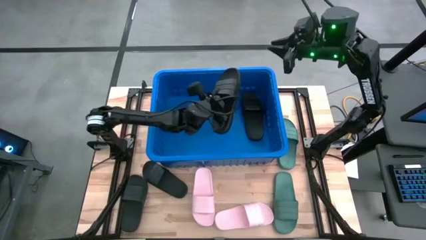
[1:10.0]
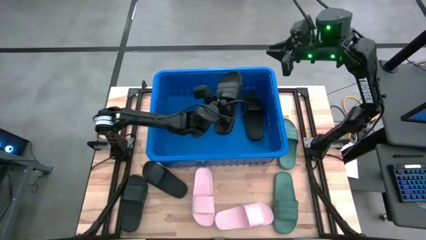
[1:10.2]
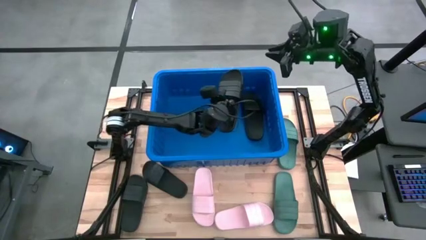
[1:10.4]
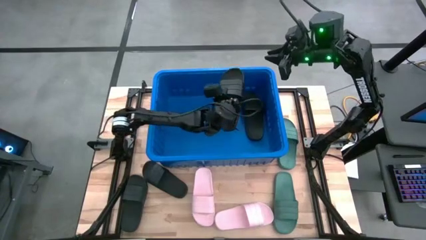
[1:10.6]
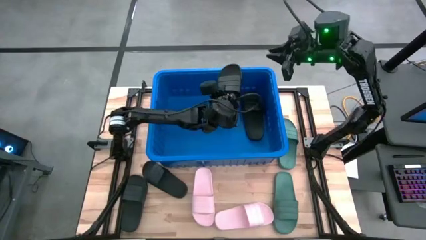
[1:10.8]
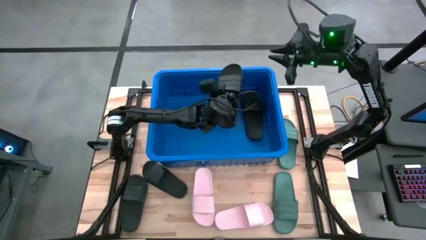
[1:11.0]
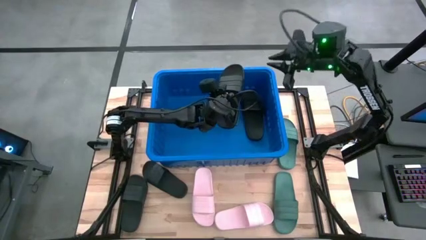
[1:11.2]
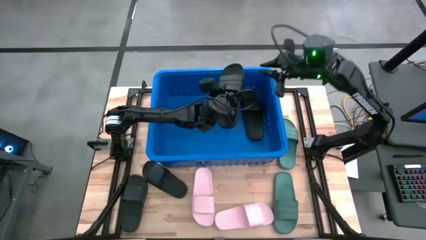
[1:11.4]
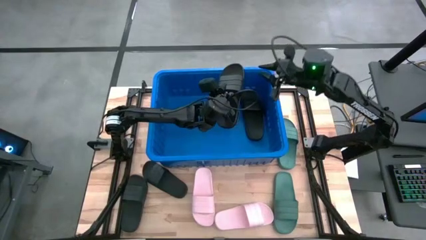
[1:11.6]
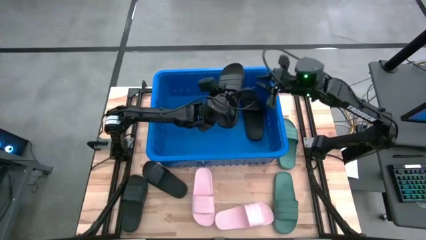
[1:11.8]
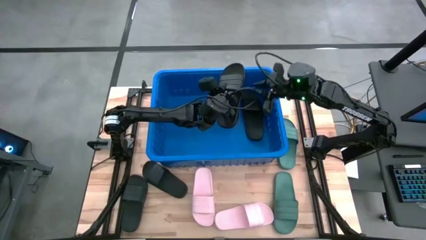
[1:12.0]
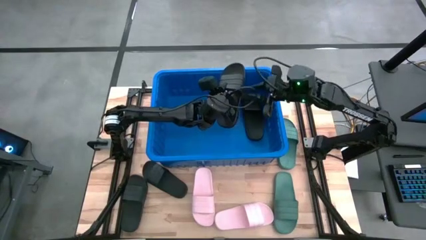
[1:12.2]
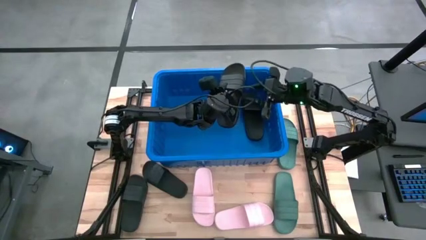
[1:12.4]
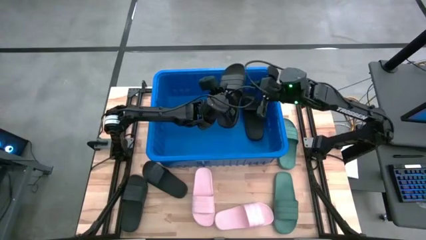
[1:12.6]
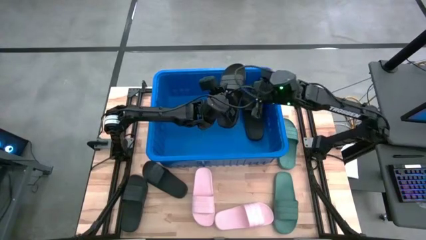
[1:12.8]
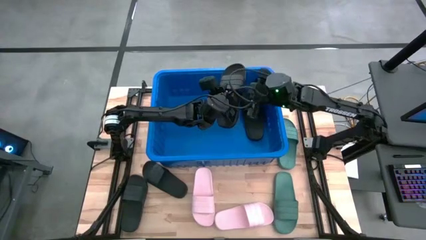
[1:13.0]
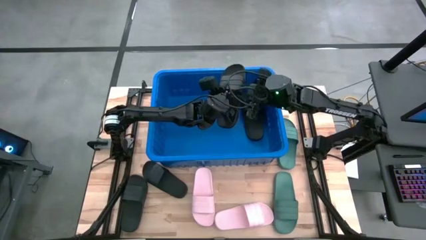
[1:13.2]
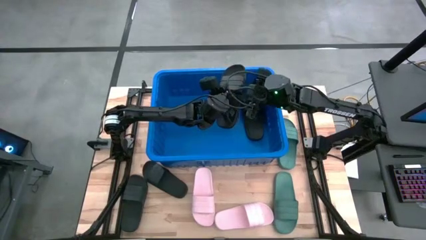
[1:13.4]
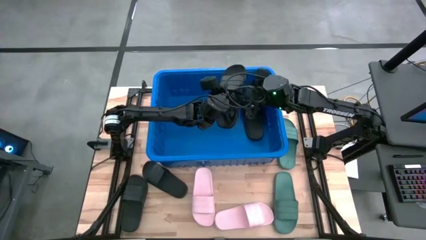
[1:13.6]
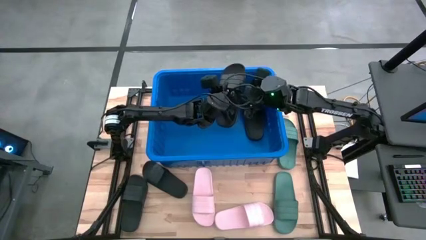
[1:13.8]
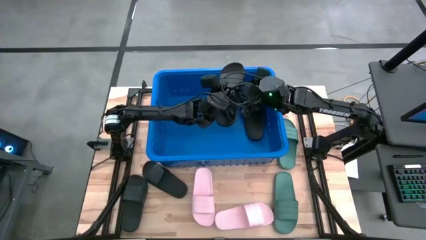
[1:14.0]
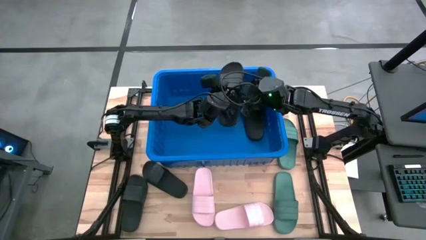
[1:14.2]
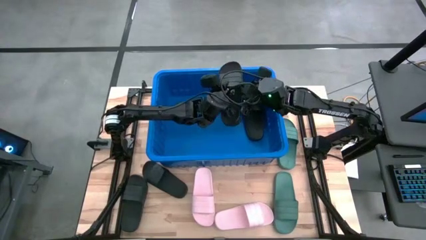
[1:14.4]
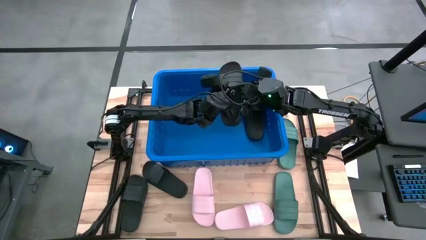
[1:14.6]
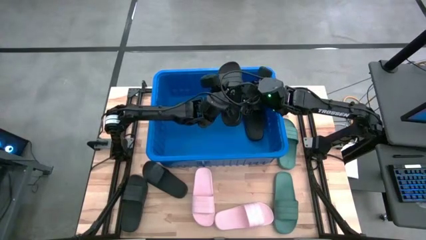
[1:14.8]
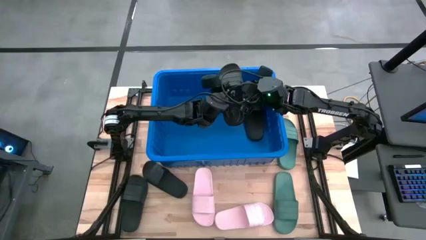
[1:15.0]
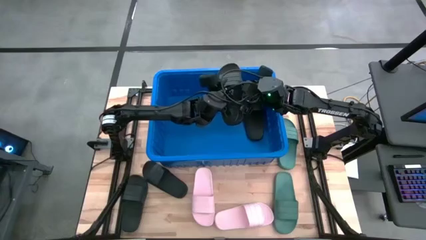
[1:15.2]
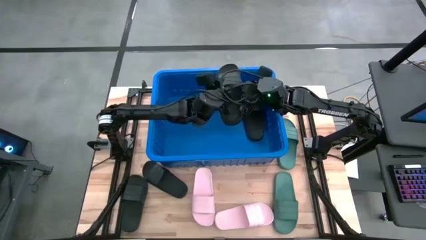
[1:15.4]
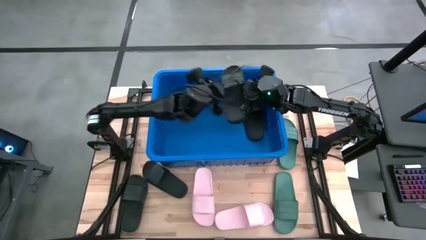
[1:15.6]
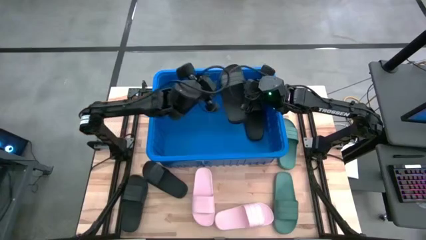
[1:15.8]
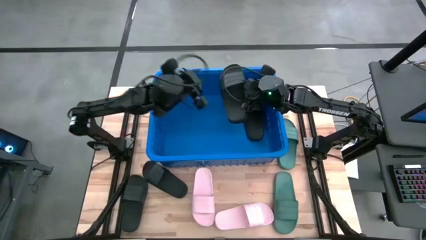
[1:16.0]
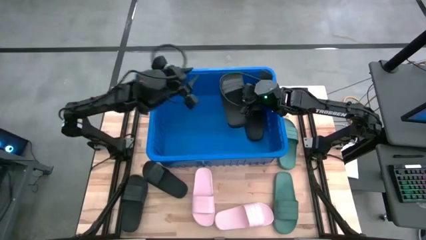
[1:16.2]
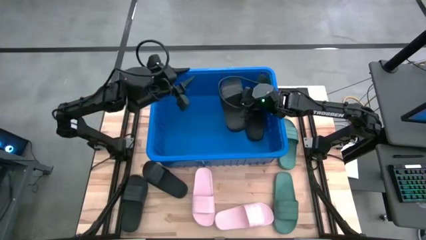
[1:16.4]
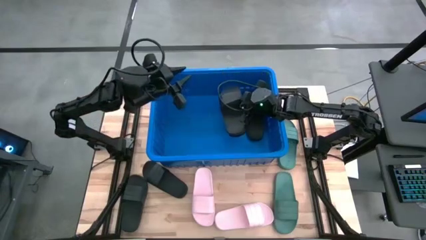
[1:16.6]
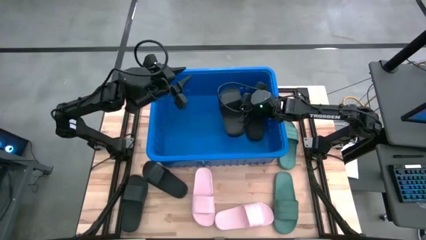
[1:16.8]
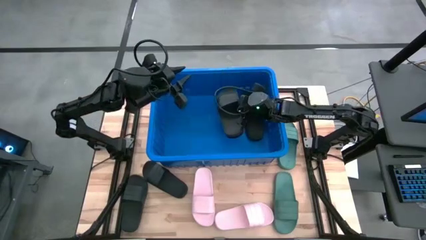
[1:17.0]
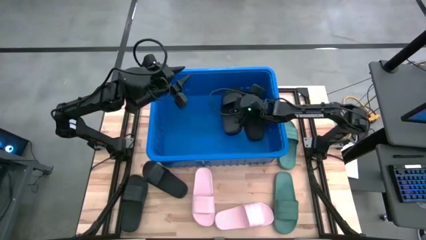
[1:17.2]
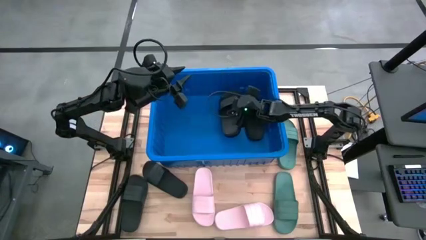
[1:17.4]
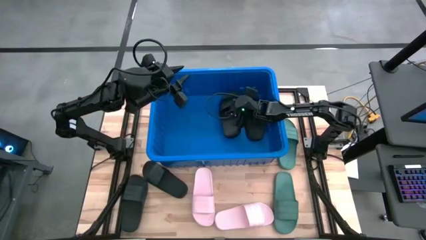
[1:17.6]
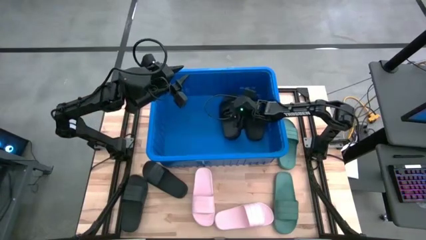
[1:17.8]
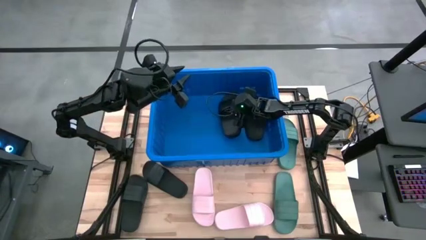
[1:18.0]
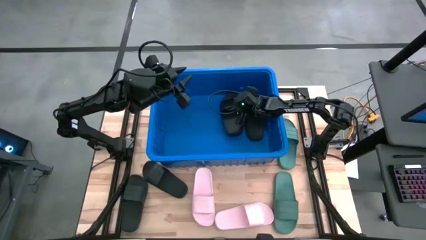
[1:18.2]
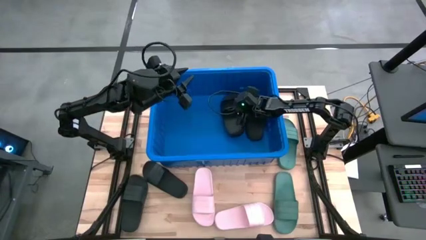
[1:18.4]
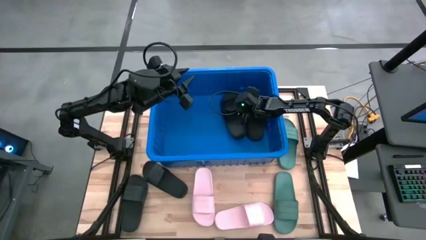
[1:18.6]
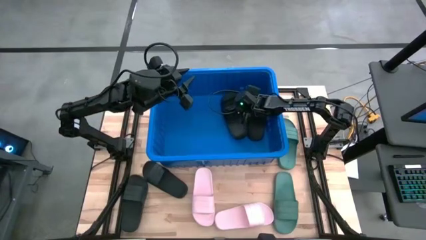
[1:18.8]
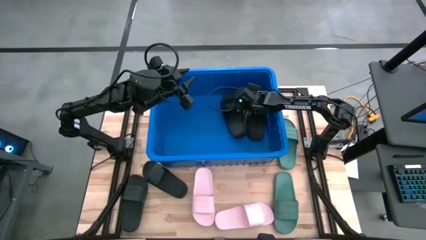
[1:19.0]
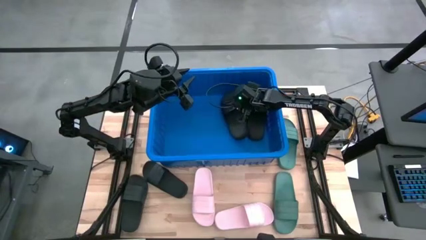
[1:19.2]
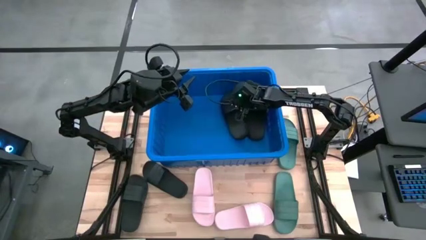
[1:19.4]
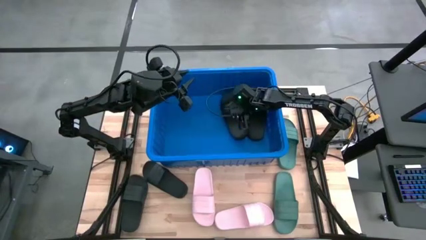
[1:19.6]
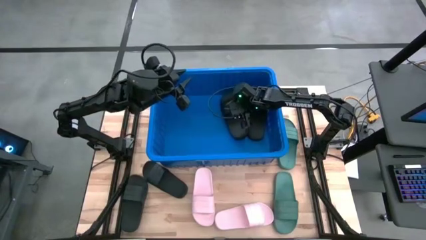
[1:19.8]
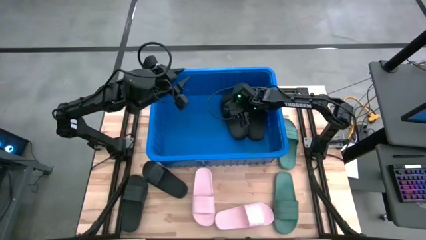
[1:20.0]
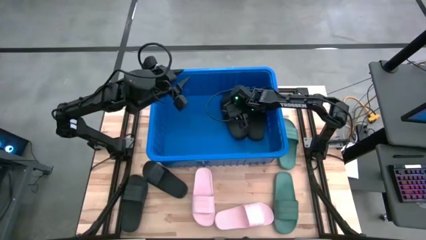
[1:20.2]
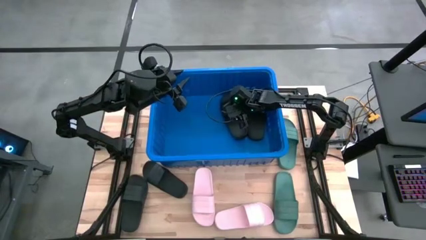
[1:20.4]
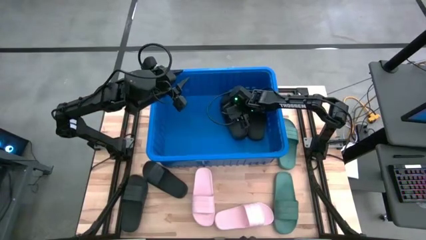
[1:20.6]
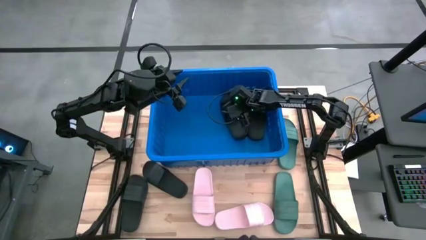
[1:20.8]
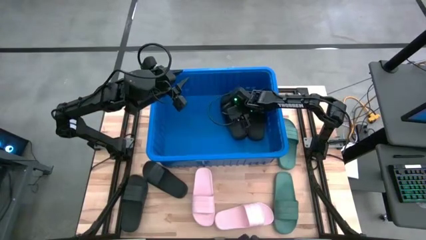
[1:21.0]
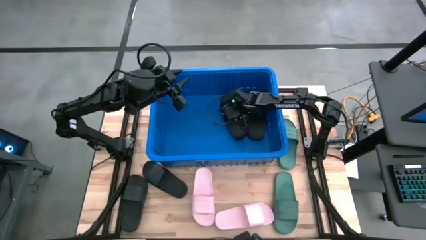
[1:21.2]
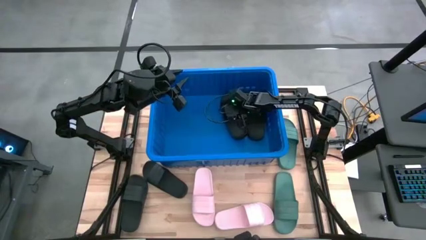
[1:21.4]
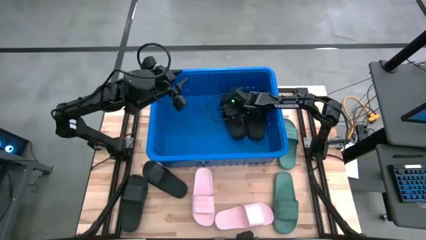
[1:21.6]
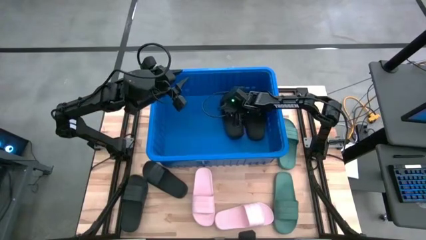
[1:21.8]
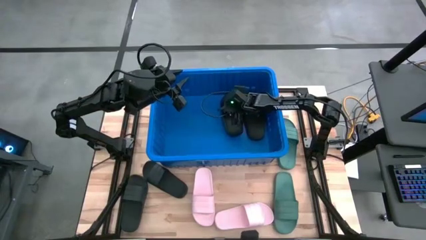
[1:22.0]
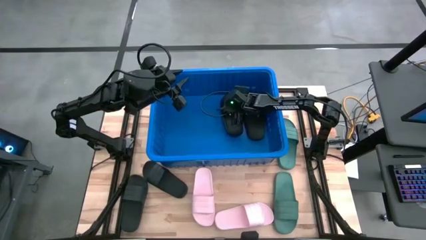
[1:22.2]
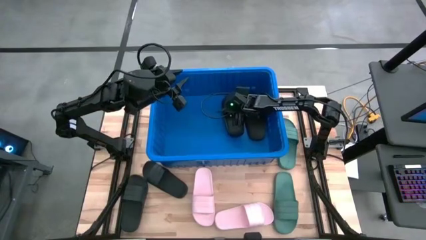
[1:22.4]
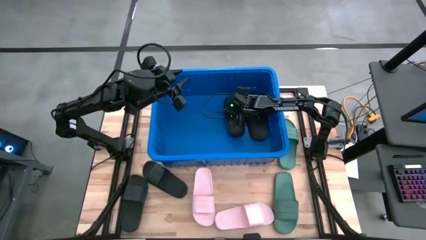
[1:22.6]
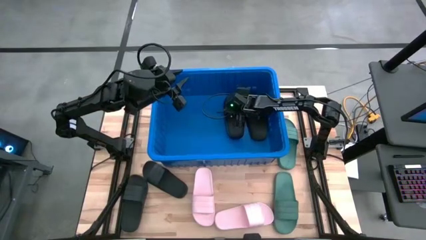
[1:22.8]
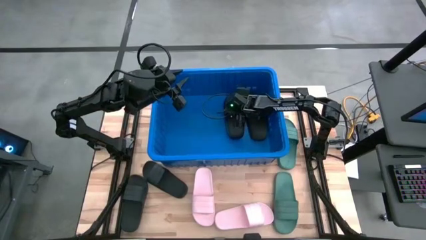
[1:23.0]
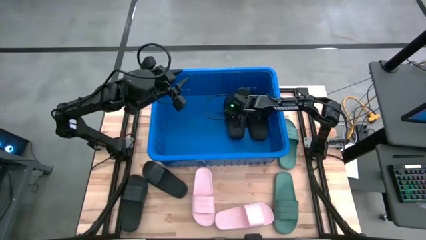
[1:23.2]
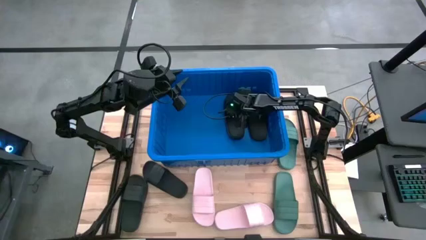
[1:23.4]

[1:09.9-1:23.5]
Task: Pick and place slides into bin
Put the black slide into the blue bin

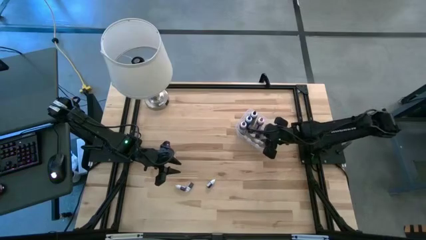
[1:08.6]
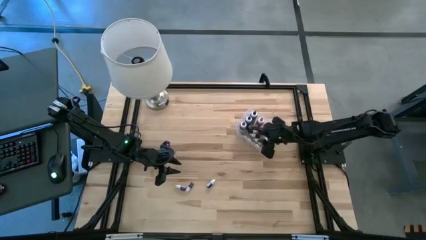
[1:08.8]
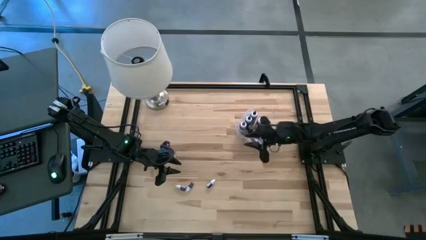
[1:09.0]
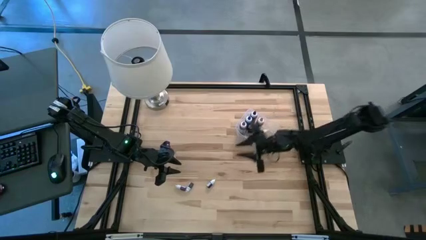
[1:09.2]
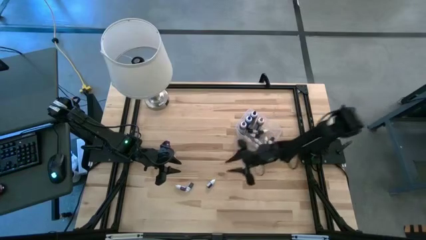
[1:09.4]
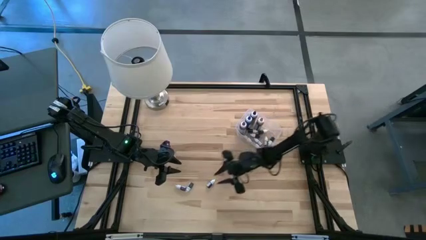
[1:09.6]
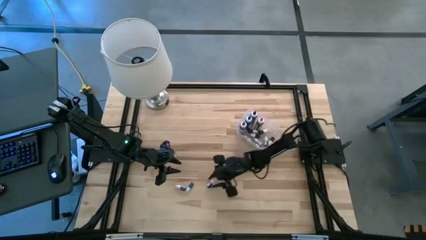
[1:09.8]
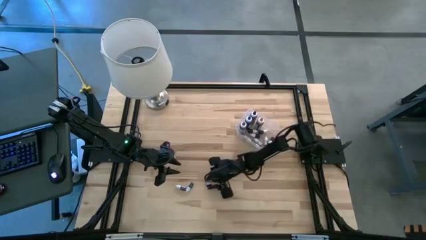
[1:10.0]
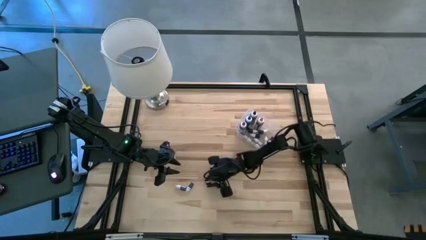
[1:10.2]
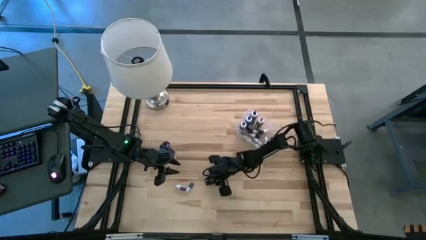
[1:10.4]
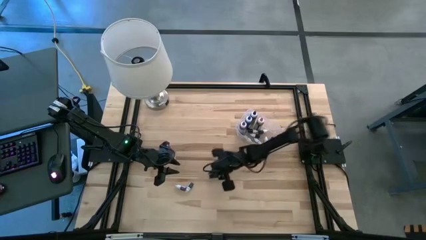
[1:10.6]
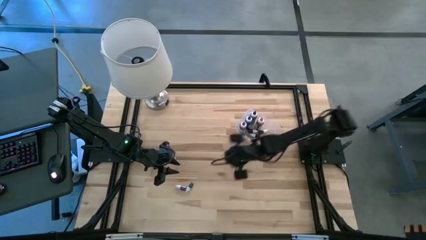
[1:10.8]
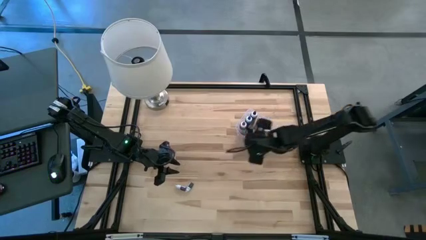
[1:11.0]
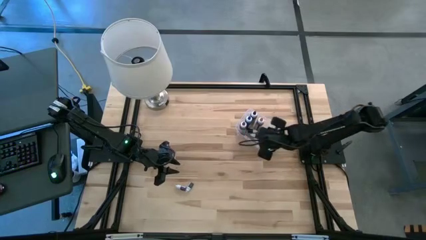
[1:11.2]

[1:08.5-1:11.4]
Task: Pick & Place food coloring
Put the small red food coloring bottle into the transparent bin
